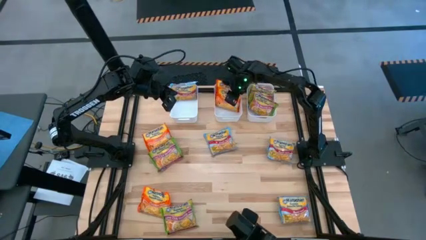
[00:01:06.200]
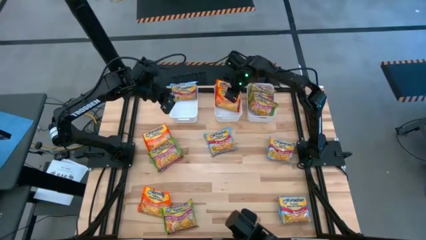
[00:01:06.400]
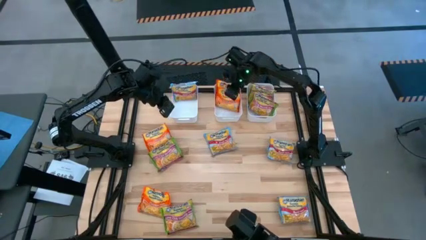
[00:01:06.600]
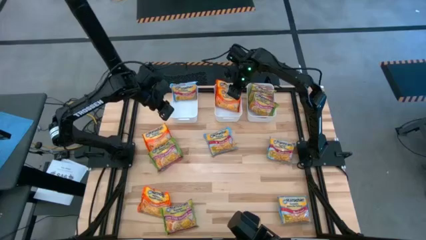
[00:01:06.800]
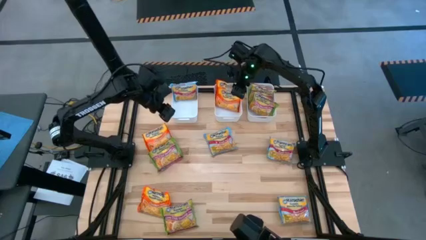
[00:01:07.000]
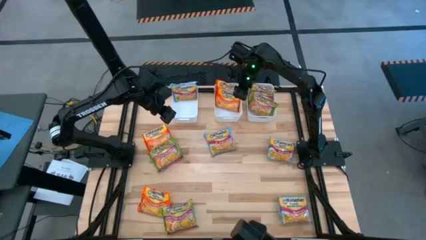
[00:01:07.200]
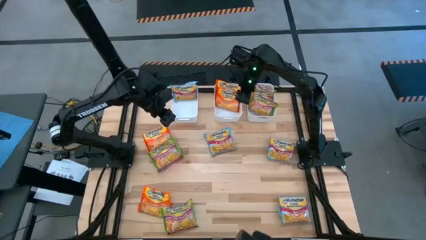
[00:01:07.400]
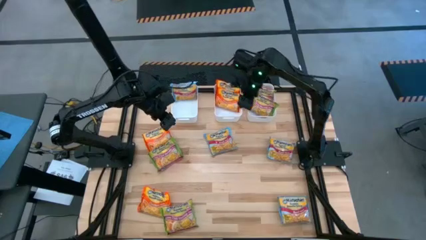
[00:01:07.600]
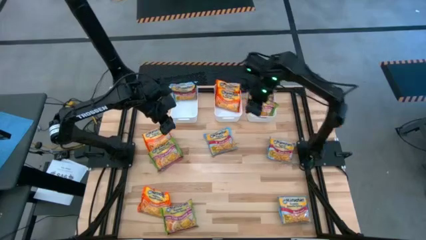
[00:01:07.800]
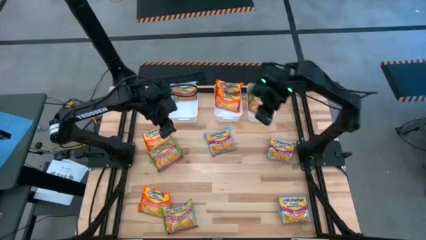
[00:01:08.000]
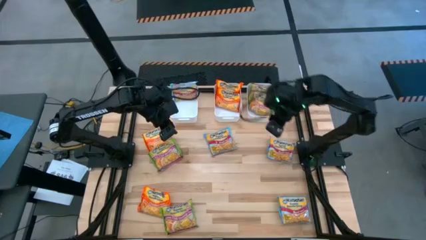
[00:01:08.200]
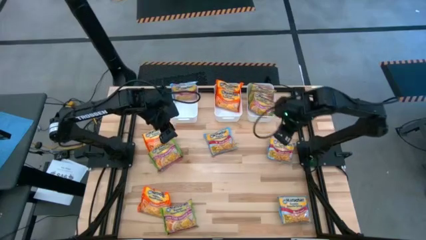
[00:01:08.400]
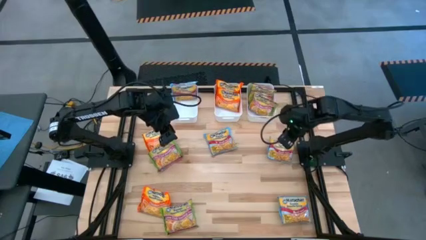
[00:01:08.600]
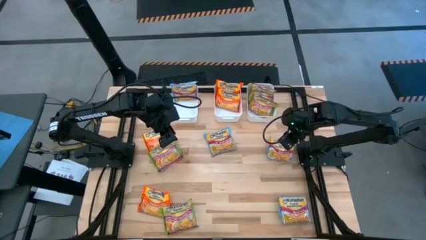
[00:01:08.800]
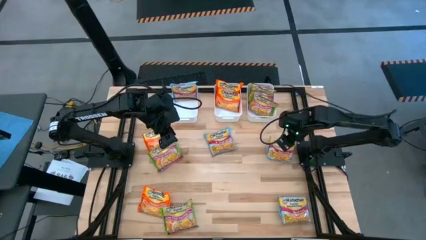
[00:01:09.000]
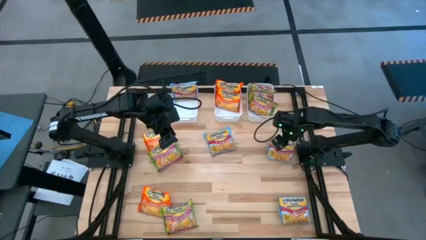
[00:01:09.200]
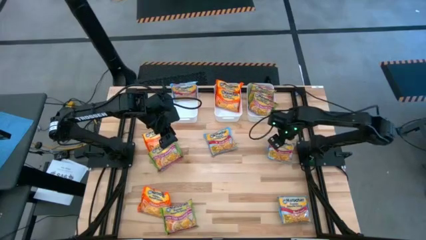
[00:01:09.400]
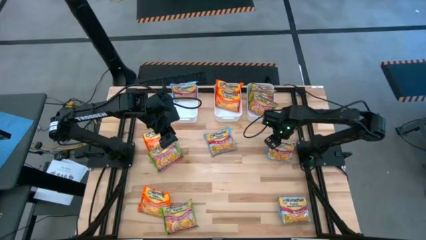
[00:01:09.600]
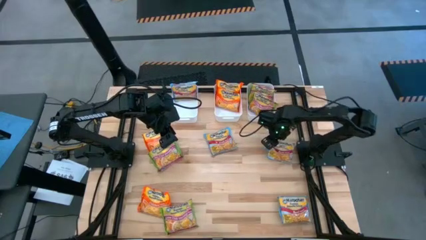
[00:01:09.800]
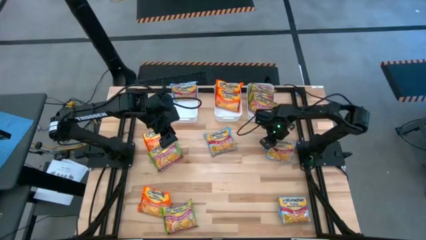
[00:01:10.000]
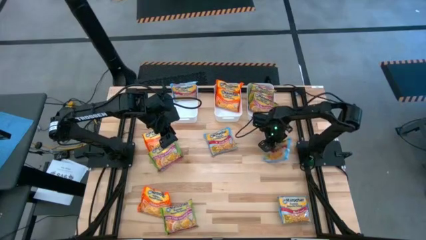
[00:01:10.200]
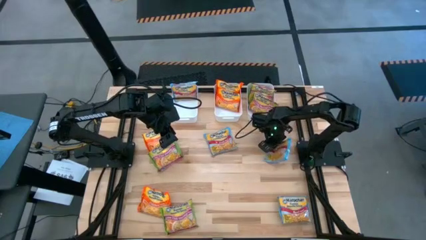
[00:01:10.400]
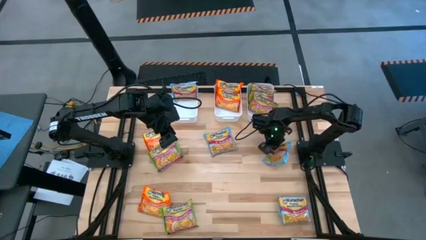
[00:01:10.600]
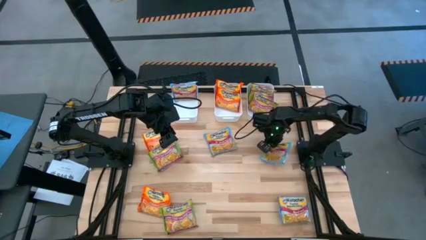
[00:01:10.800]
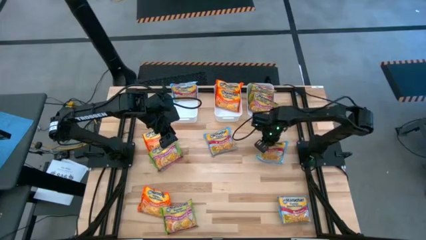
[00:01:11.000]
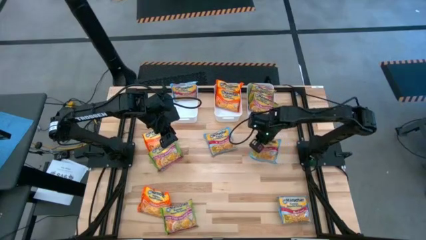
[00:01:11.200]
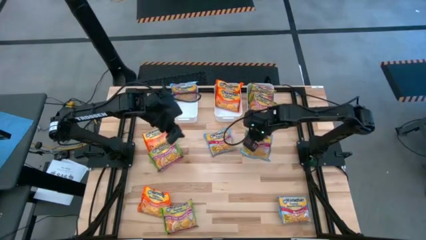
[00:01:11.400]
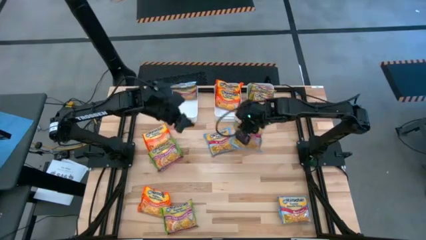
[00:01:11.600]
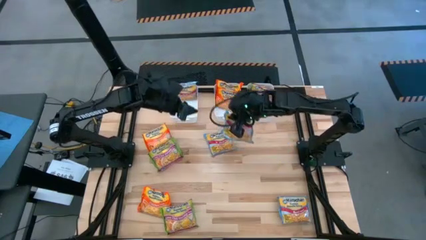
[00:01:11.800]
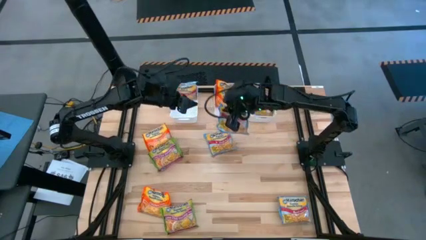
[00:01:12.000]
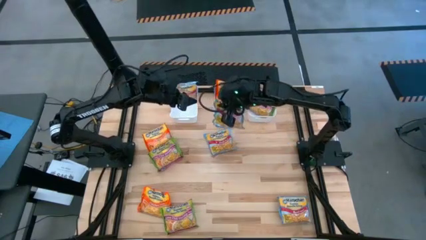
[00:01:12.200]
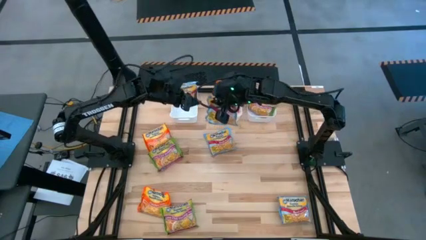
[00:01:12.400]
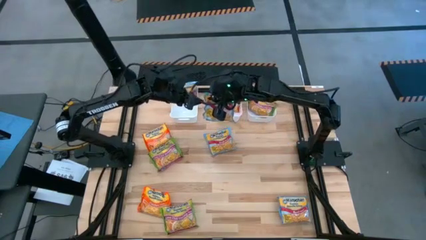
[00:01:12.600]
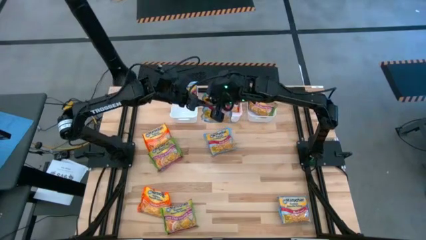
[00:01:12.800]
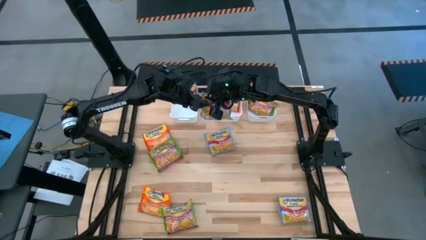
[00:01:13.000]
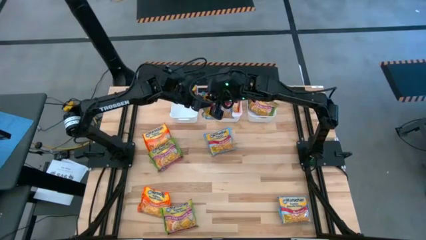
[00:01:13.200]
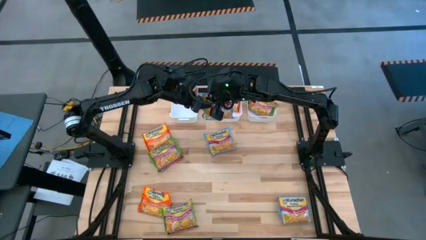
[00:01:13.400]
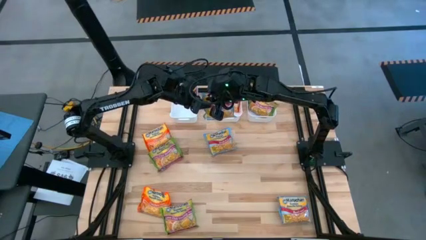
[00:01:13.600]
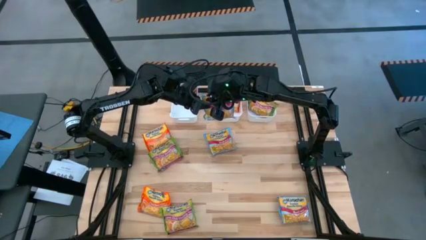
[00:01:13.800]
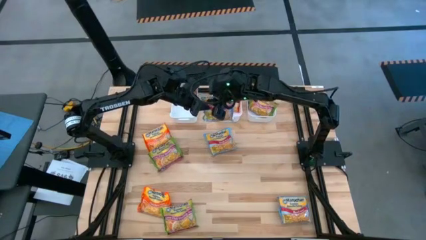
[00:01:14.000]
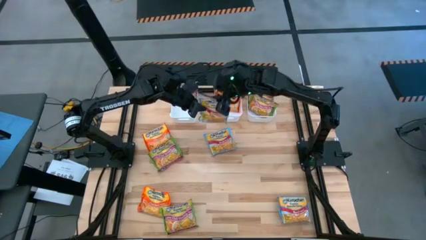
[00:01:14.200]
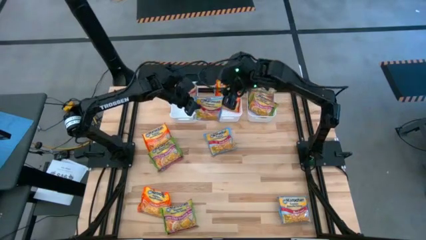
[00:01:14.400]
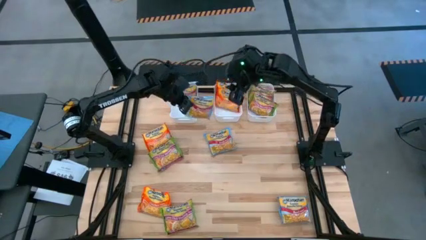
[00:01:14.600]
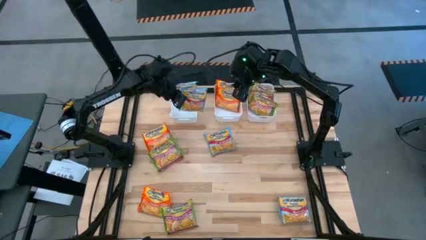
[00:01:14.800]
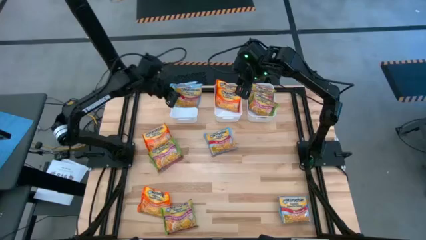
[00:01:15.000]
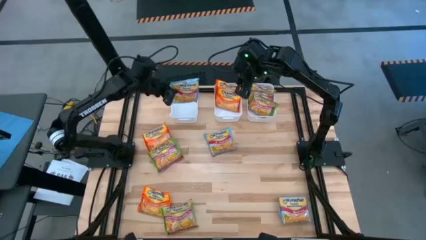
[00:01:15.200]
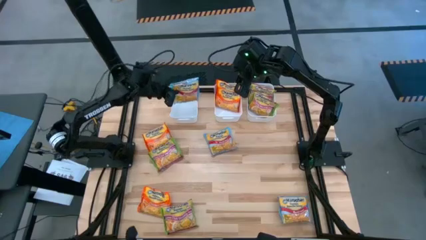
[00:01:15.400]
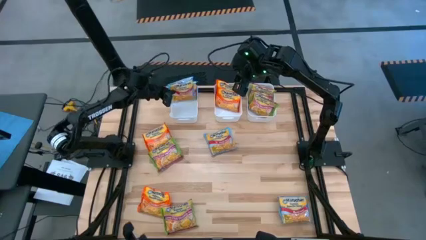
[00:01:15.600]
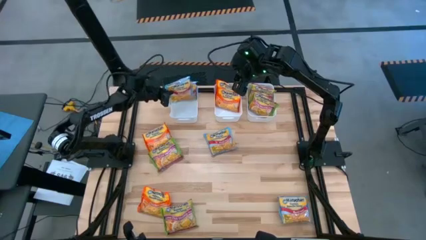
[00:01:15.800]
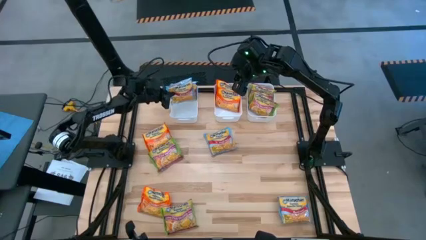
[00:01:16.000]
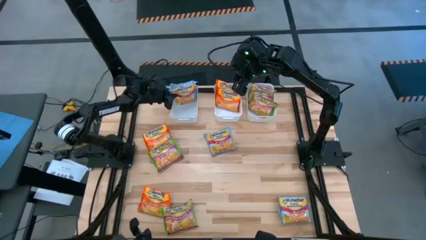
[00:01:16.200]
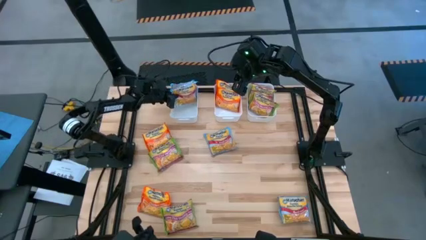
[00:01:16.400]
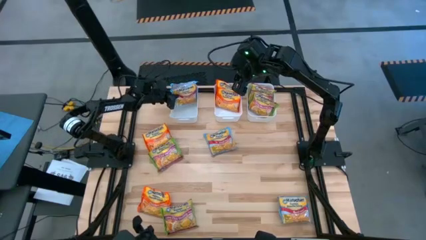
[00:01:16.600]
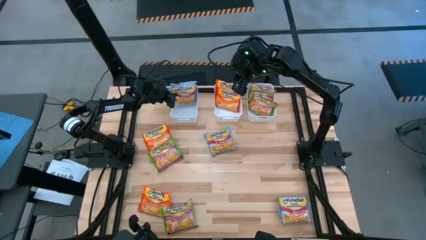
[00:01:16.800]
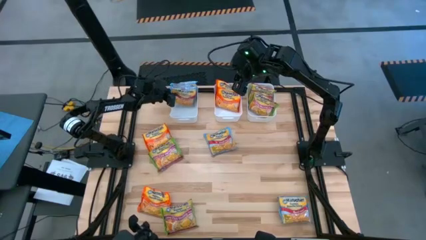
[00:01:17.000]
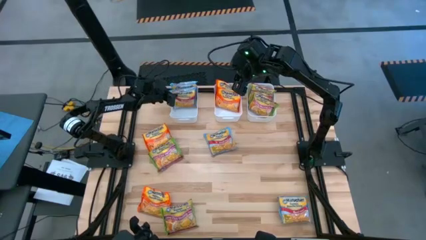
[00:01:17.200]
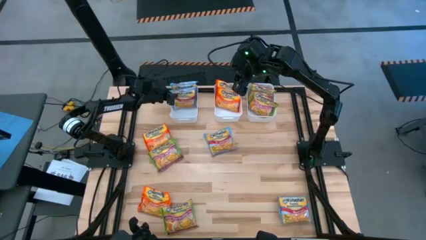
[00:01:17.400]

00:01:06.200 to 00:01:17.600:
Task: Sort Maruchan noodles
Put the blue noodle pack into the left white bin
